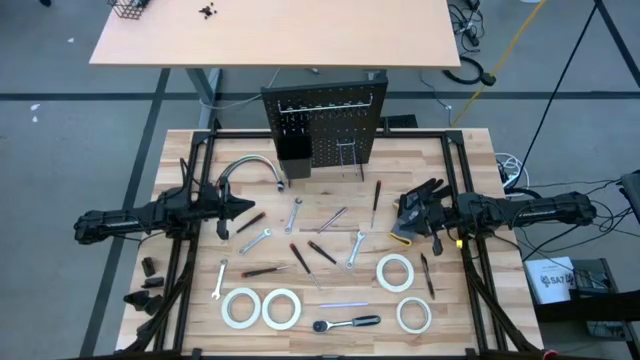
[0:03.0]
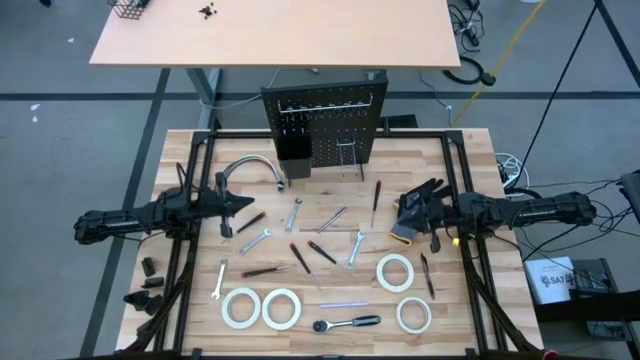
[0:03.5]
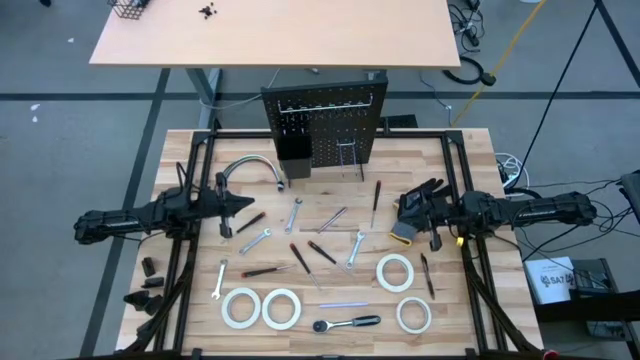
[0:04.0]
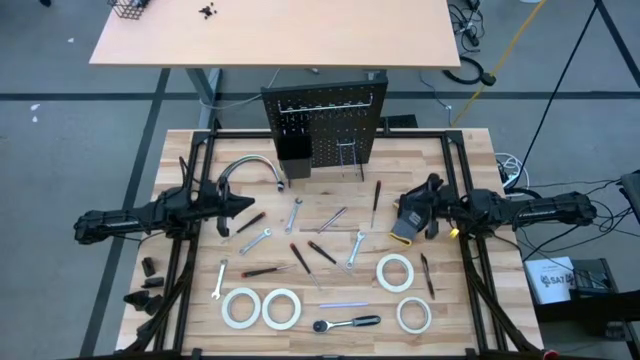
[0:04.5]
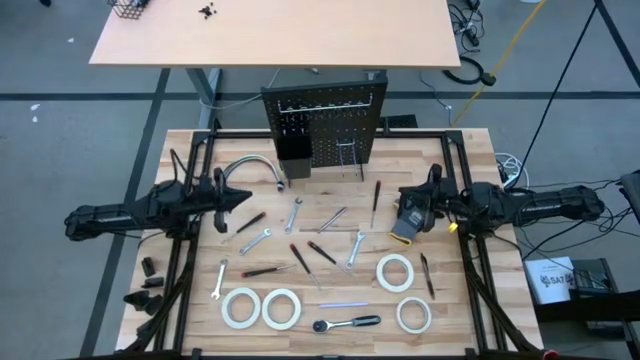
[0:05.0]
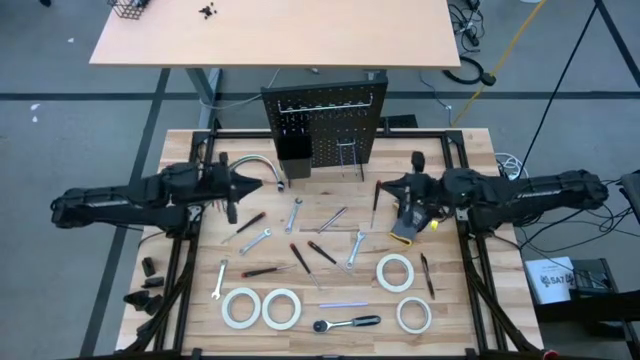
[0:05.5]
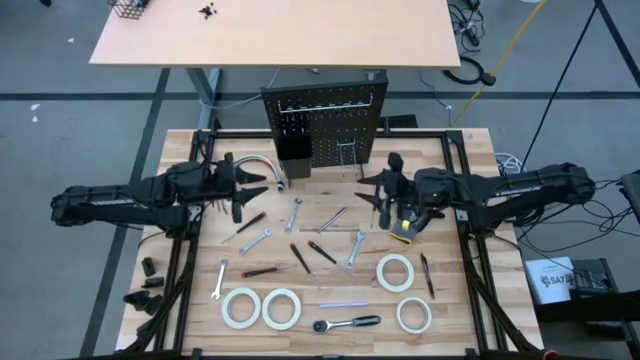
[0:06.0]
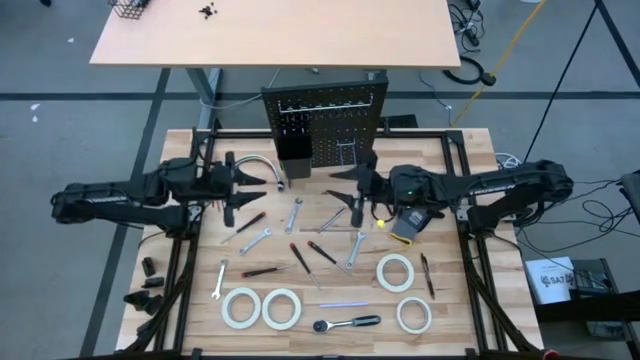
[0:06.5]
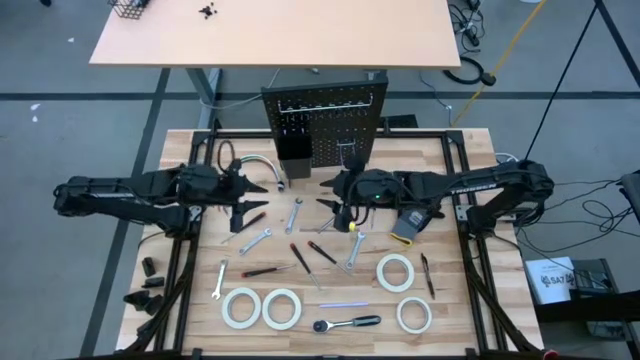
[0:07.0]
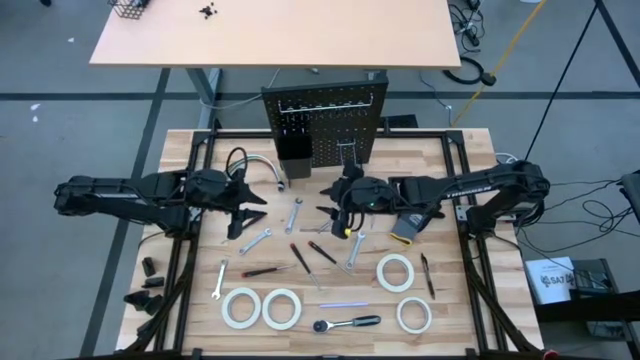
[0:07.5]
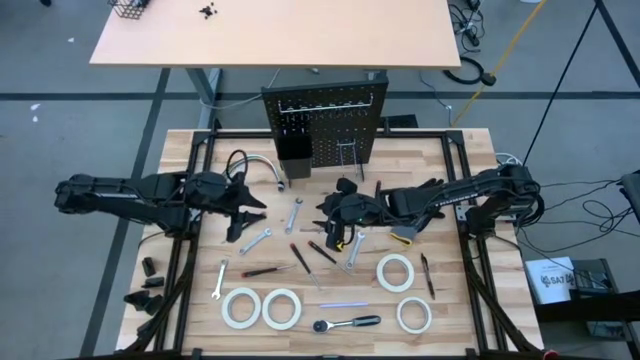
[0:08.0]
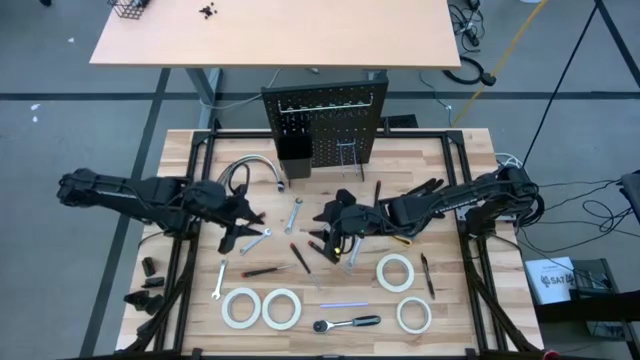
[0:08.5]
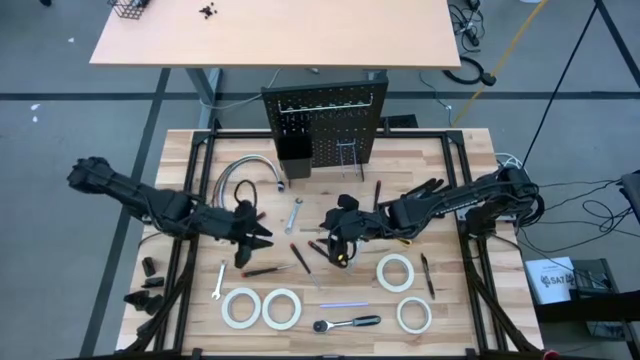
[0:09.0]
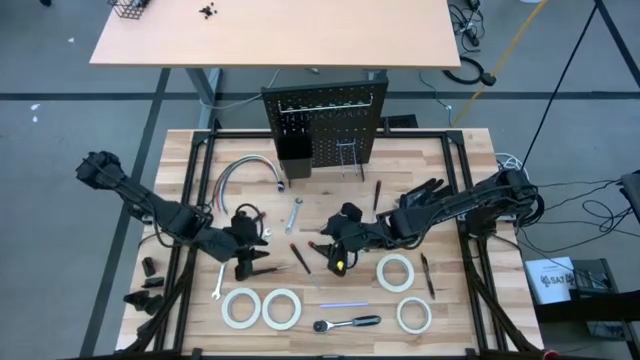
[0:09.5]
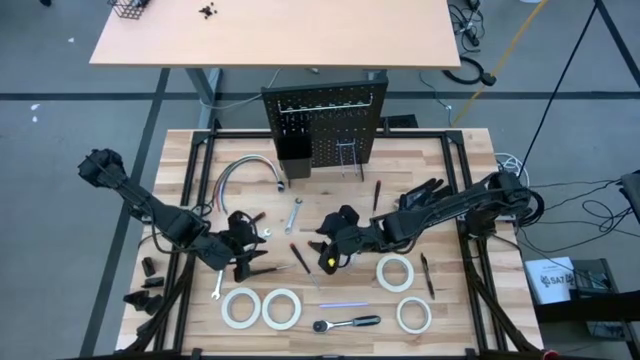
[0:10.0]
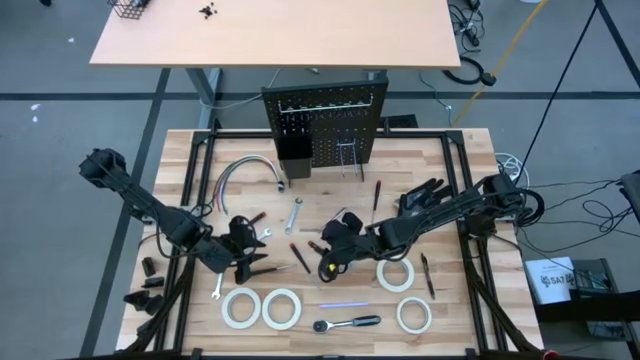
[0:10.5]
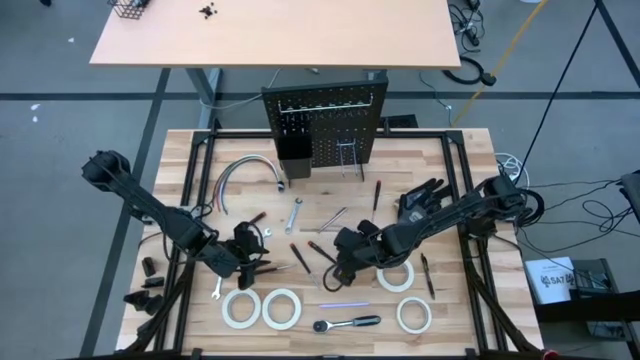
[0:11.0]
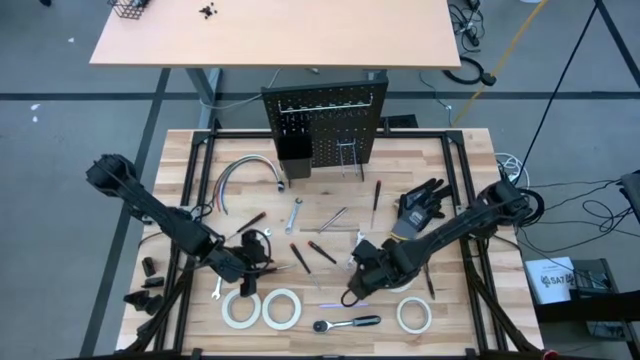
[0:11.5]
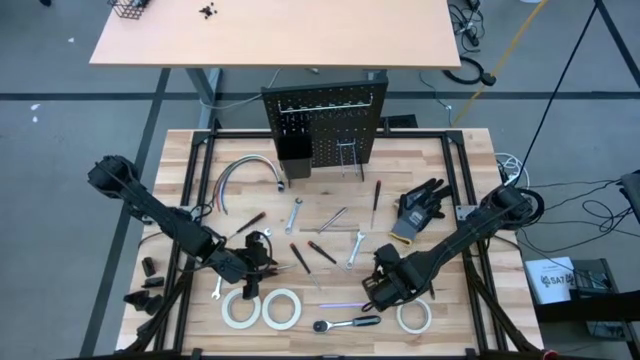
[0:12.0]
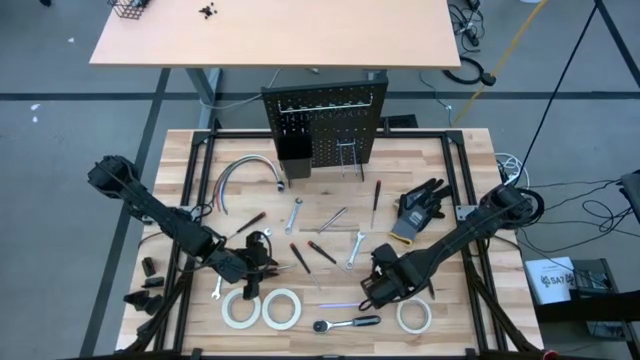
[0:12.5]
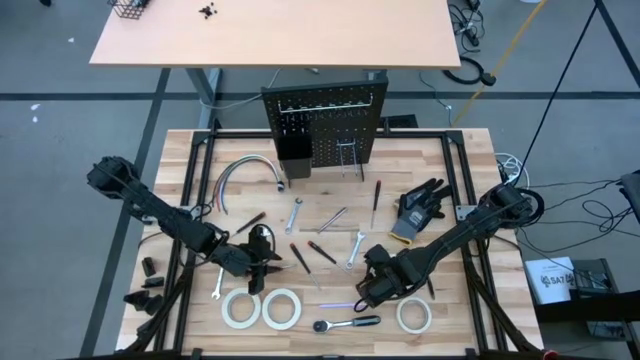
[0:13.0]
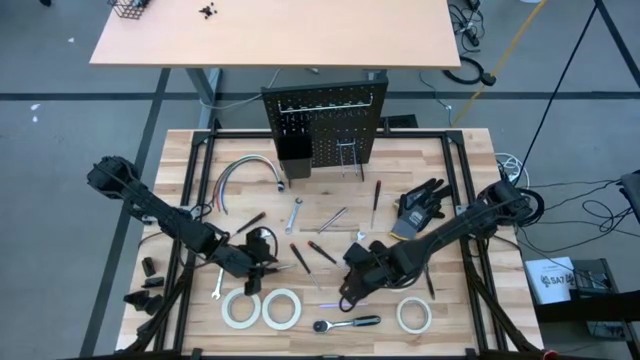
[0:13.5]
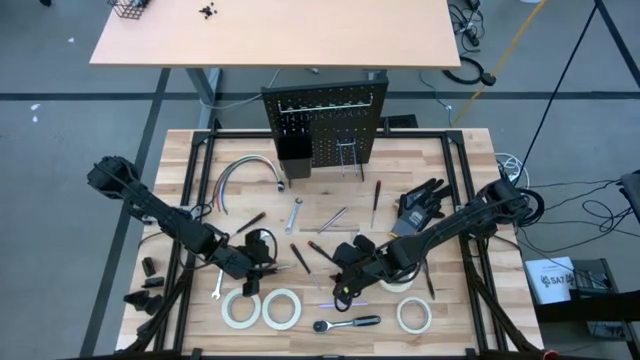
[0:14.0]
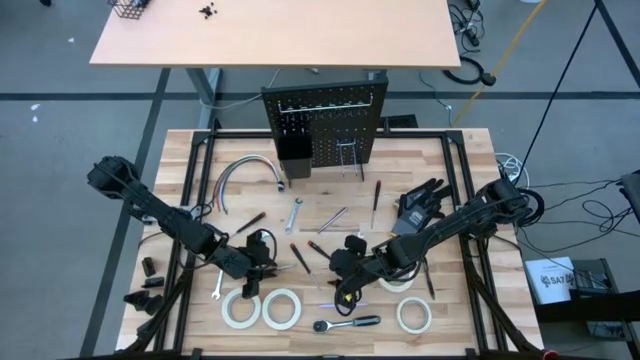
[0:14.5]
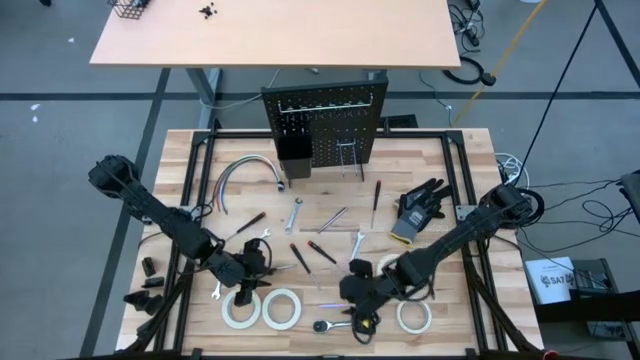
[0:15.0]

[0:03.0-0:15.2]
Task: Hang tools onto peg board
Put the ratchet wrench into the peg board

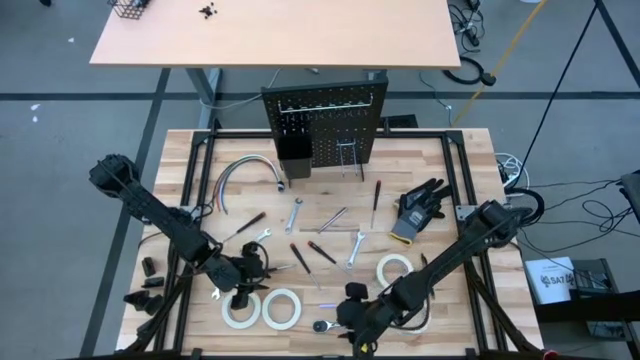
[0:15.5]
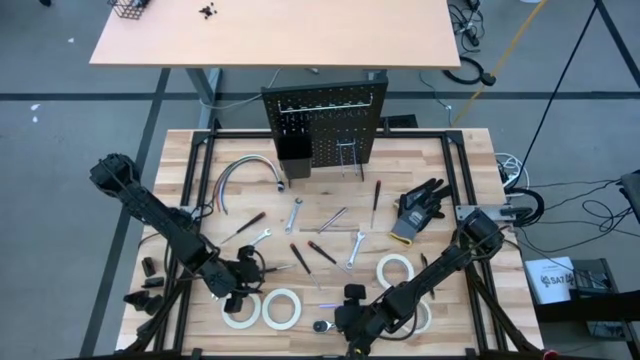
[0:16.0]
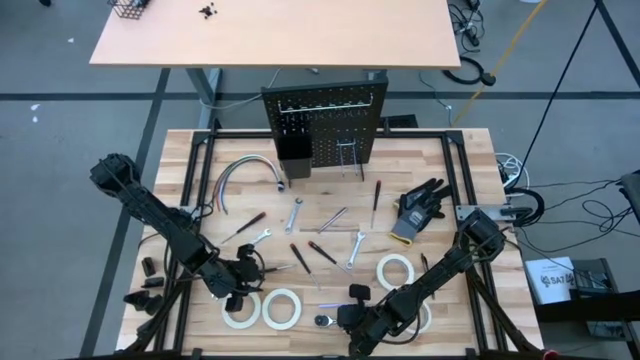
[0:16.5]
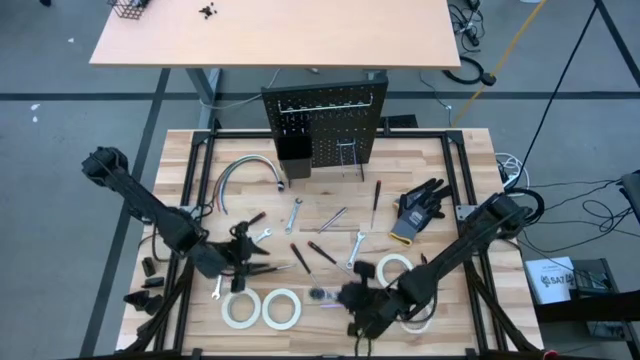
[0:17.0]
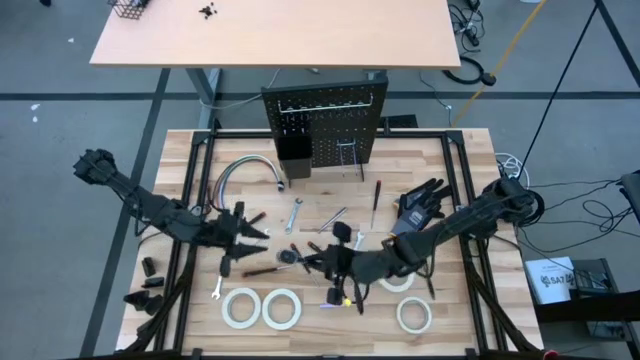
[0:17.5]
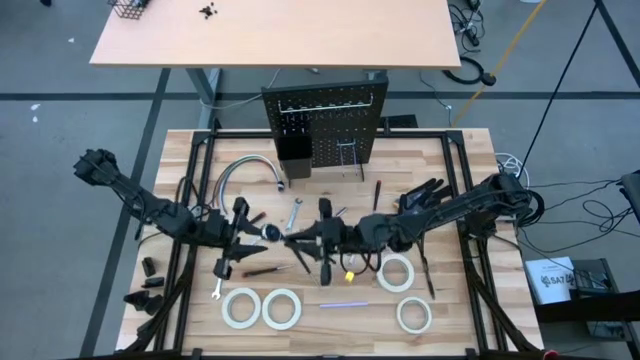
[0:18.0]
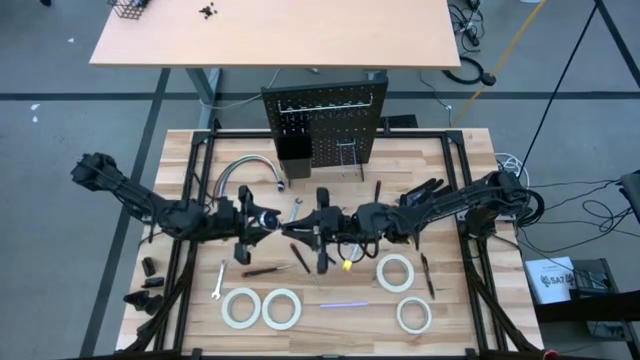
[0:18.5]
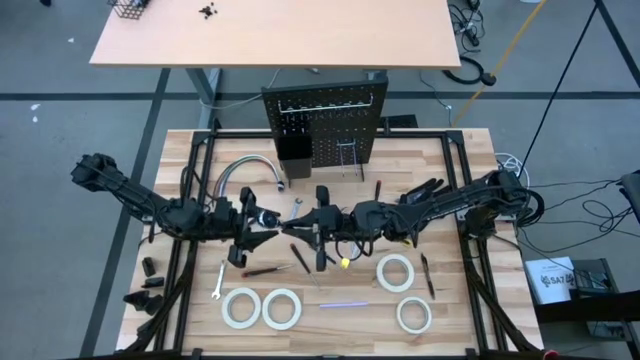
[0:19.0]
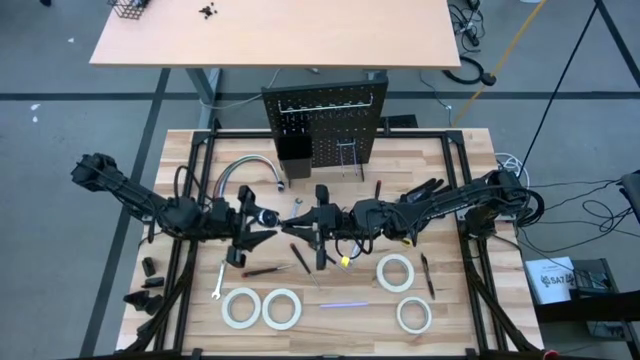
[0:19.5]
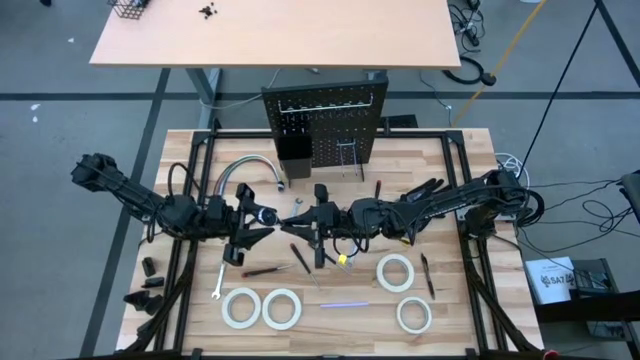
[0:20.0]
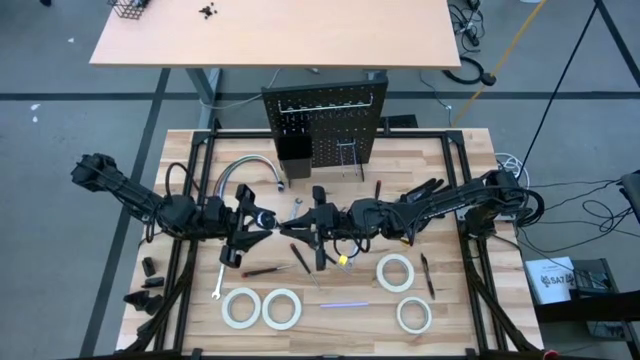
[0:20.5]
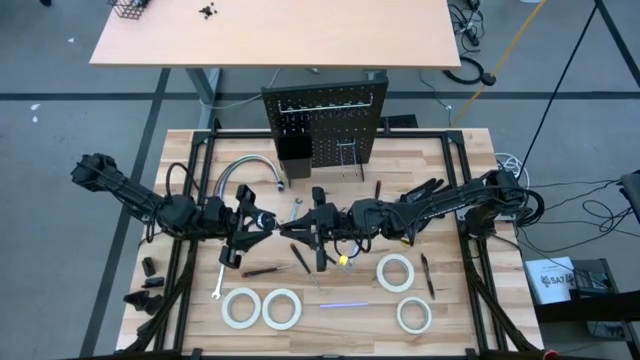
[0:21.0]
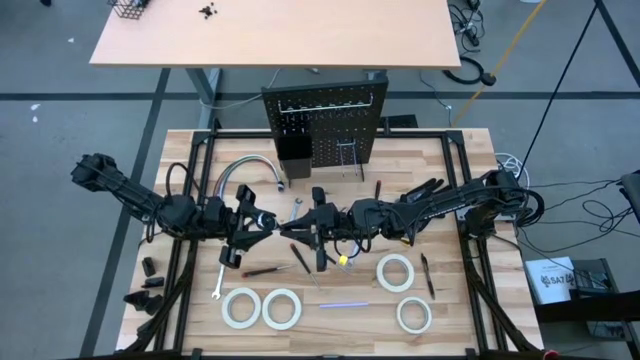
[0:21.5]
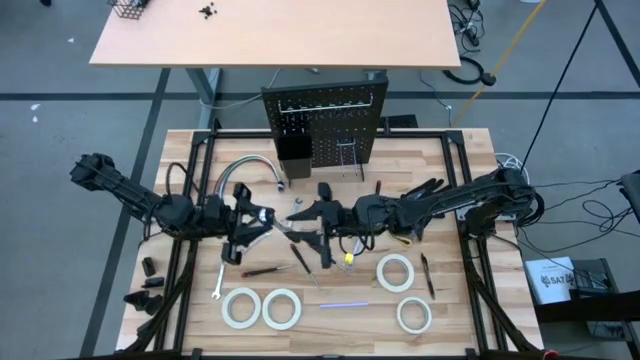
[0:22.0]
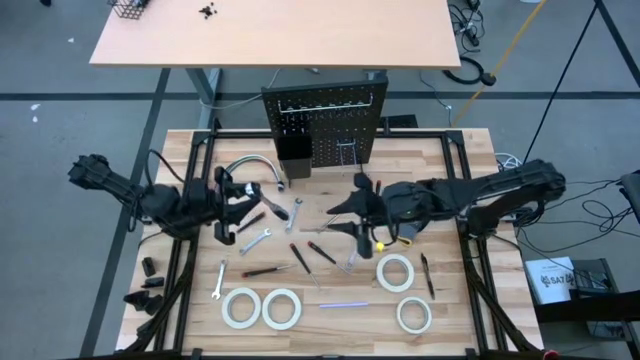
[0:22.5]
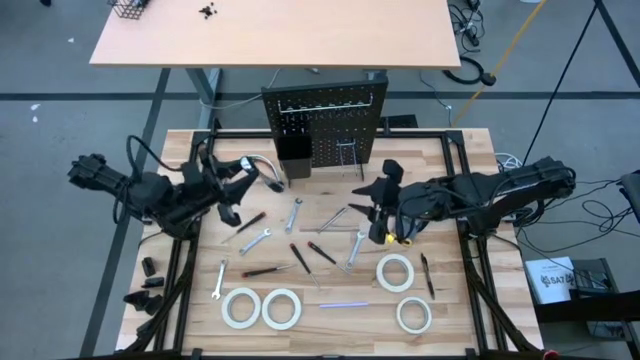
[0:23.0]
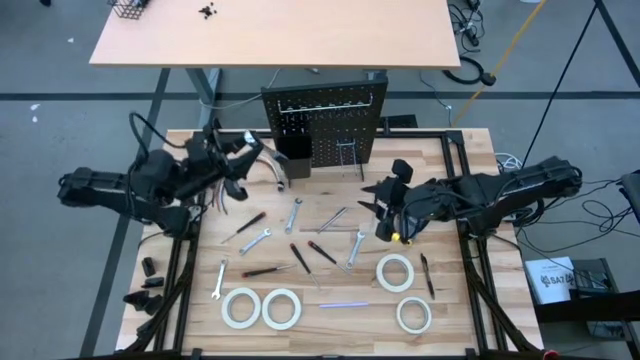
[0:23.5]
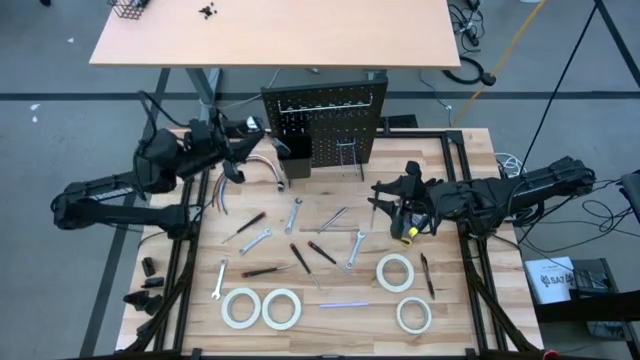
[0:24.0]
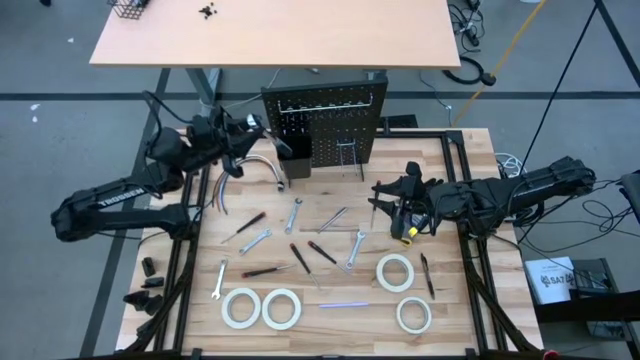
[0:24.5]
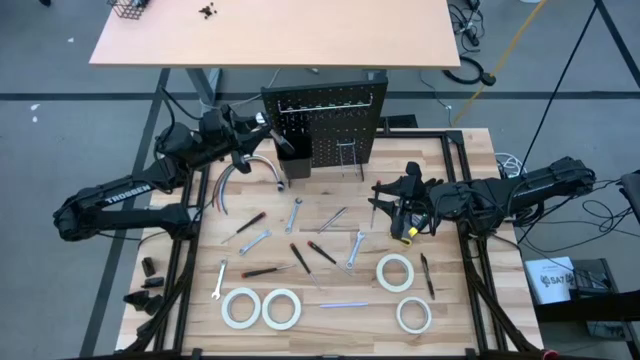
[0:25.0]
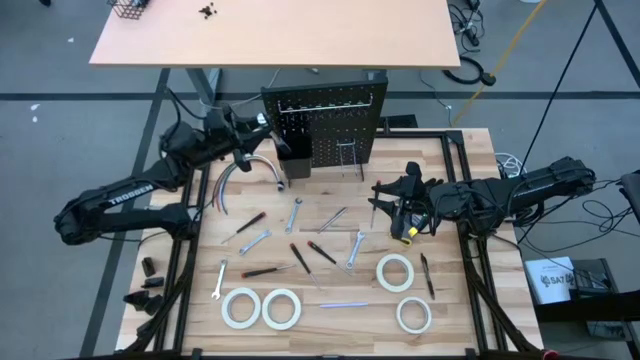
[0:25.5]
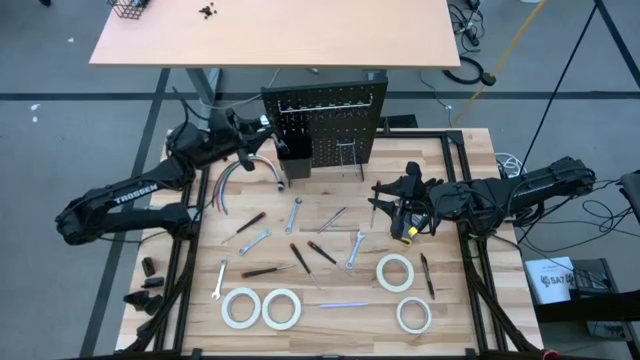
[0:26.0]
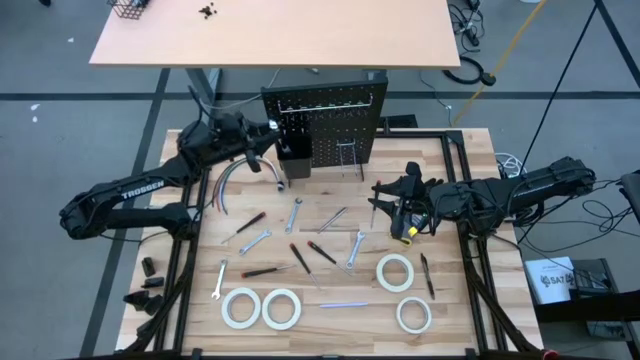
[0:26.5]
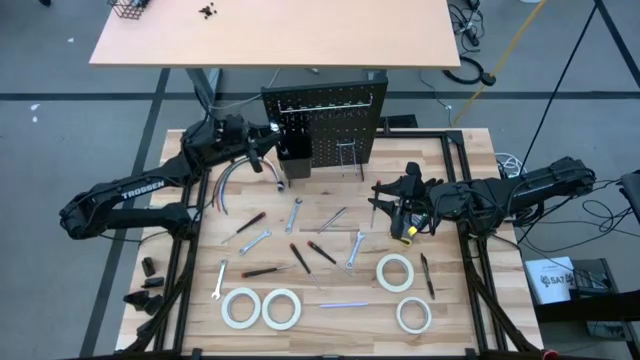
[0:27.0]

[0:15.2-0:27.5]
Put the ratchet wrench into the peg board
